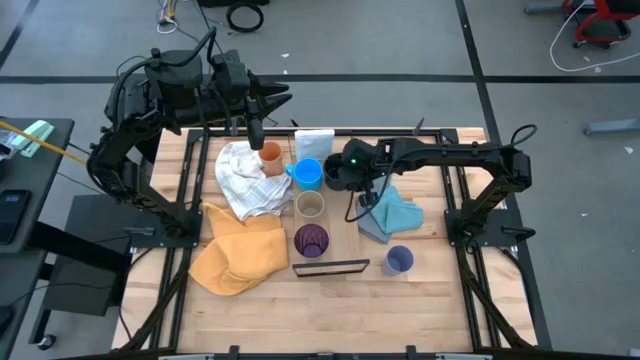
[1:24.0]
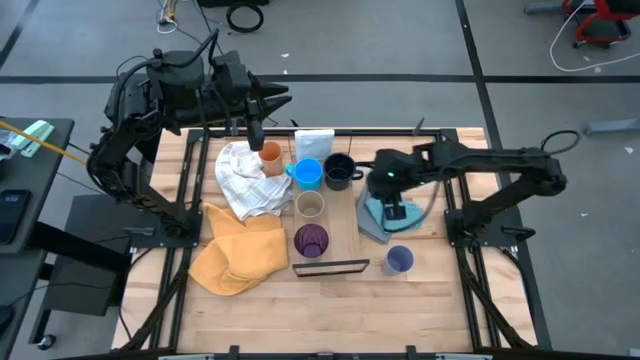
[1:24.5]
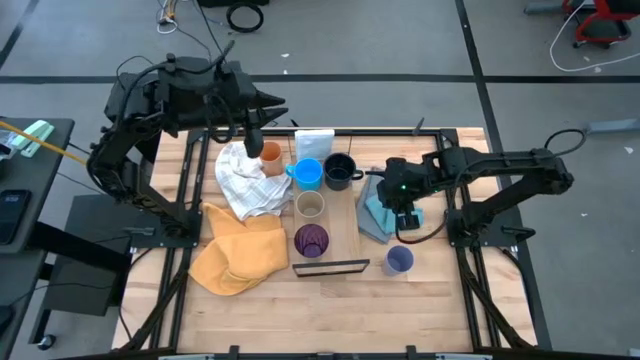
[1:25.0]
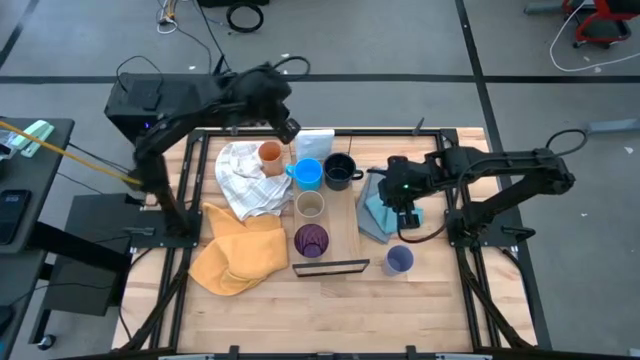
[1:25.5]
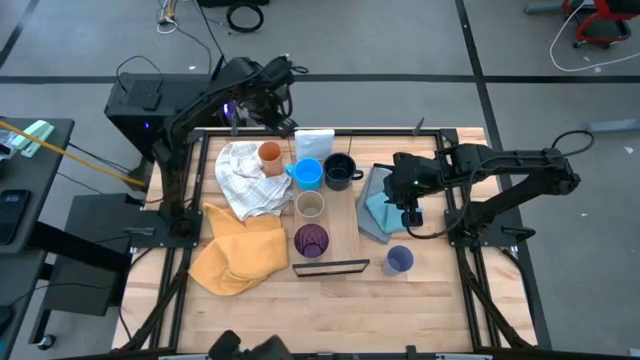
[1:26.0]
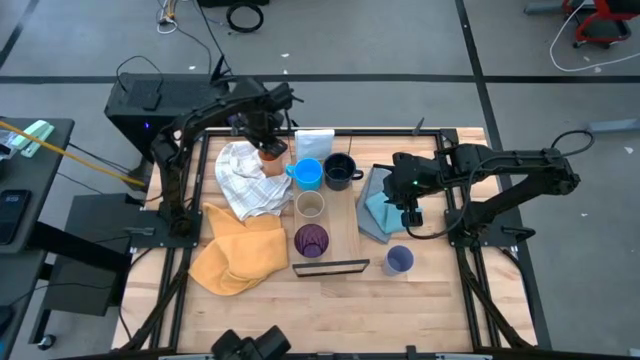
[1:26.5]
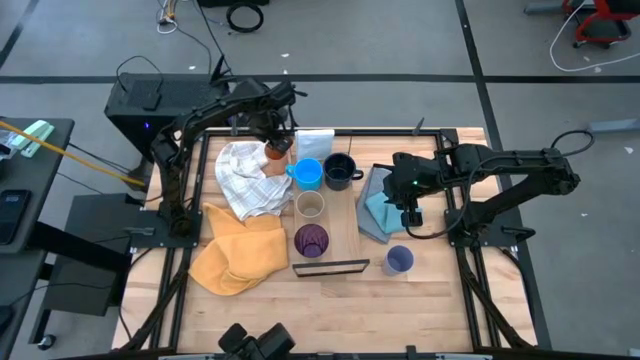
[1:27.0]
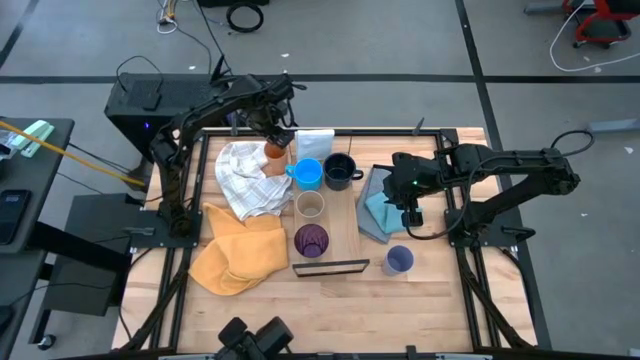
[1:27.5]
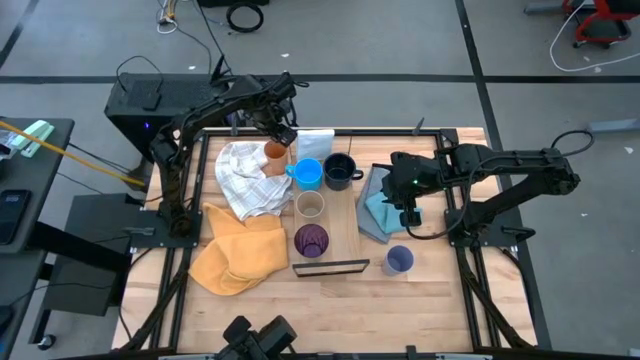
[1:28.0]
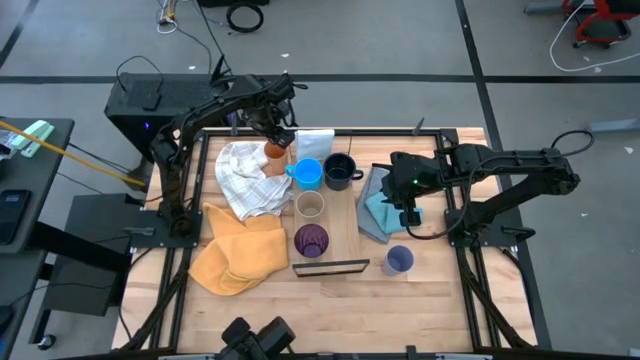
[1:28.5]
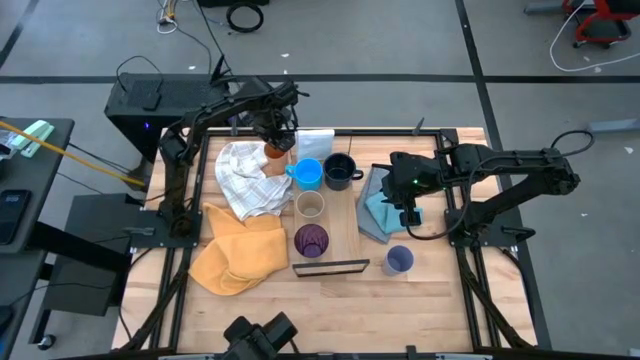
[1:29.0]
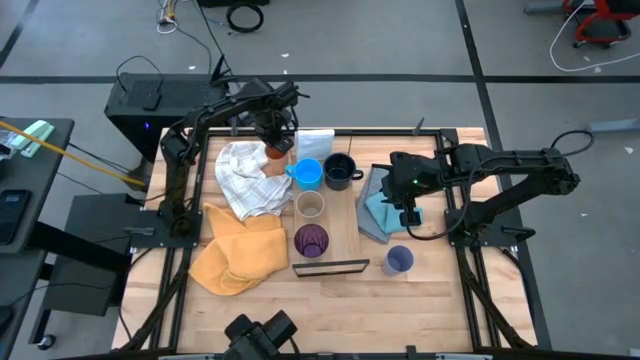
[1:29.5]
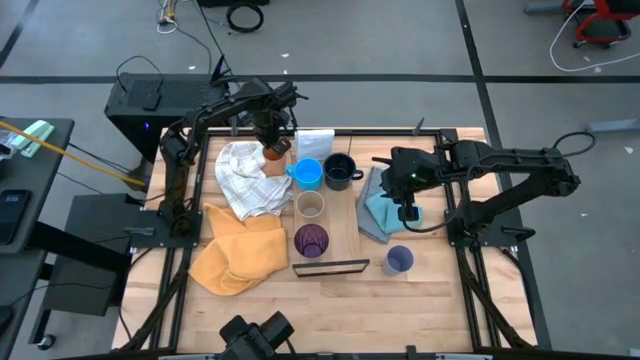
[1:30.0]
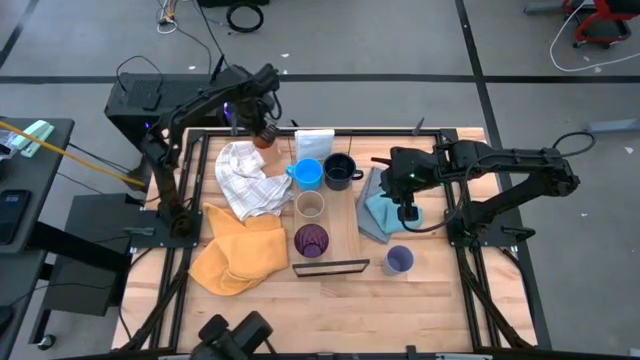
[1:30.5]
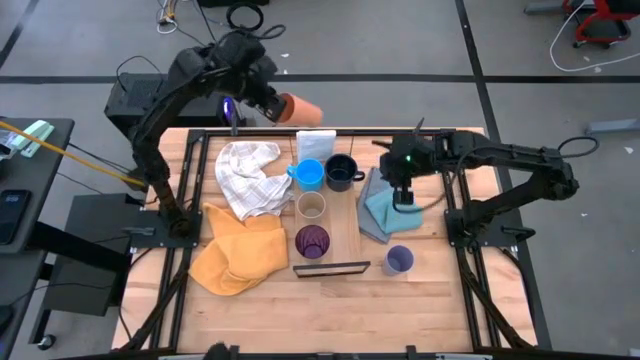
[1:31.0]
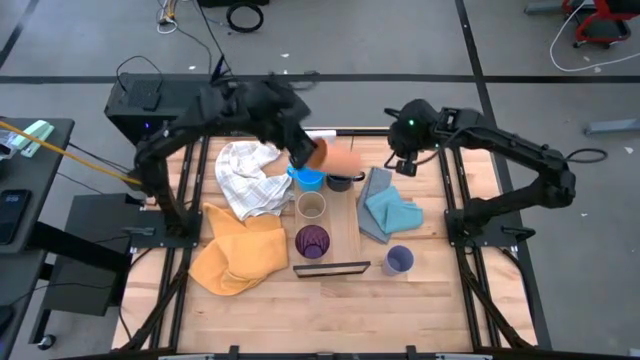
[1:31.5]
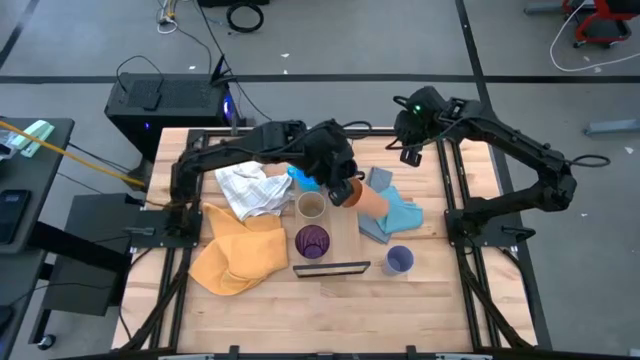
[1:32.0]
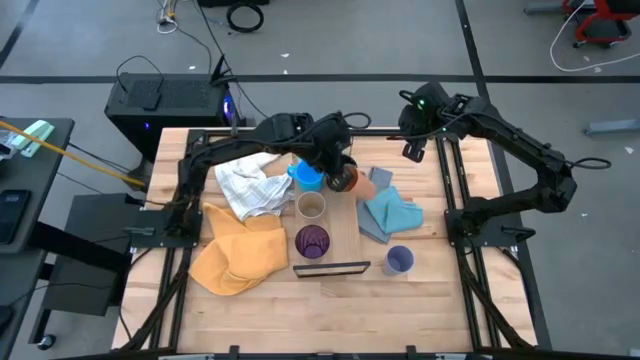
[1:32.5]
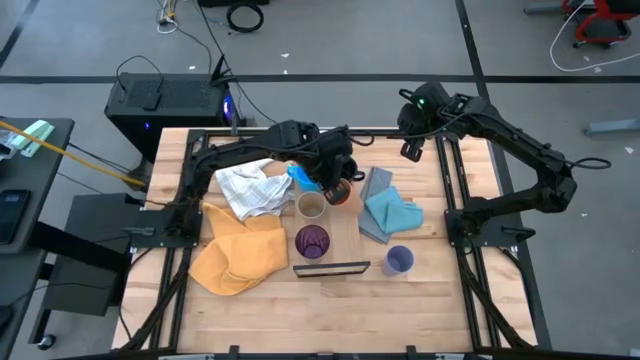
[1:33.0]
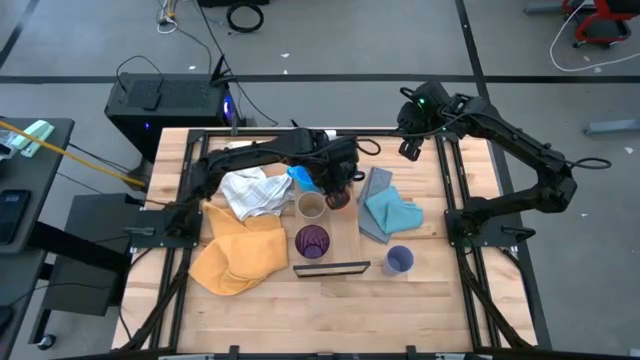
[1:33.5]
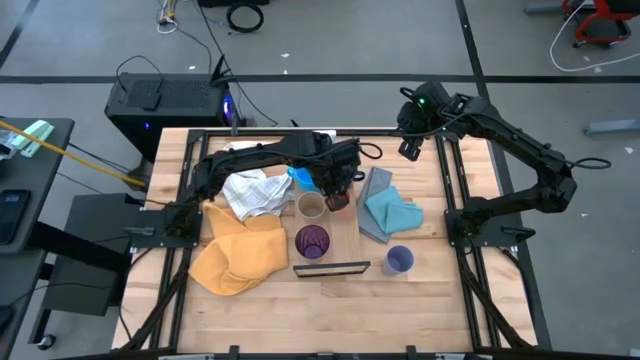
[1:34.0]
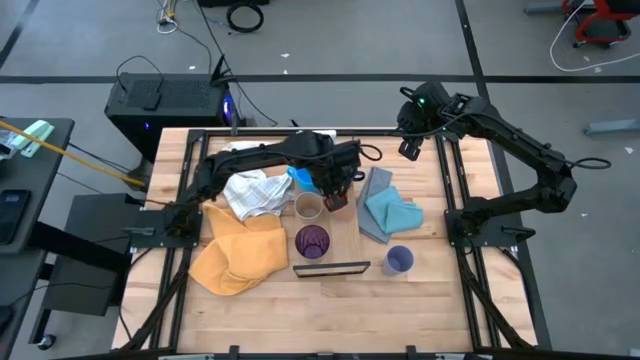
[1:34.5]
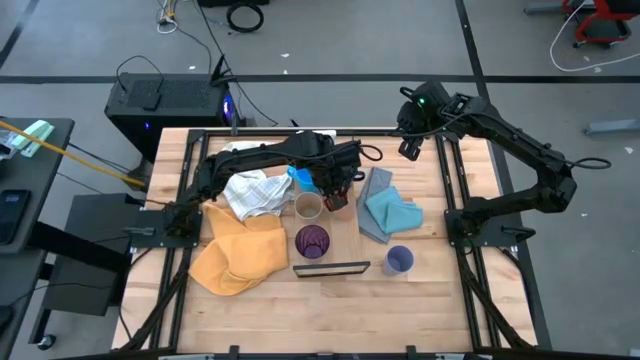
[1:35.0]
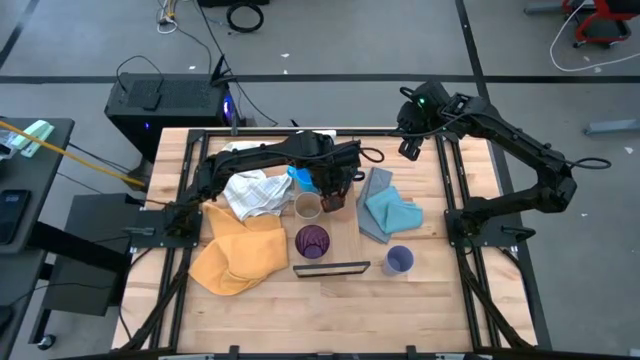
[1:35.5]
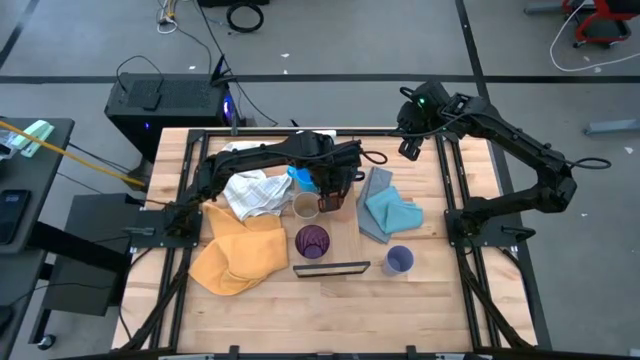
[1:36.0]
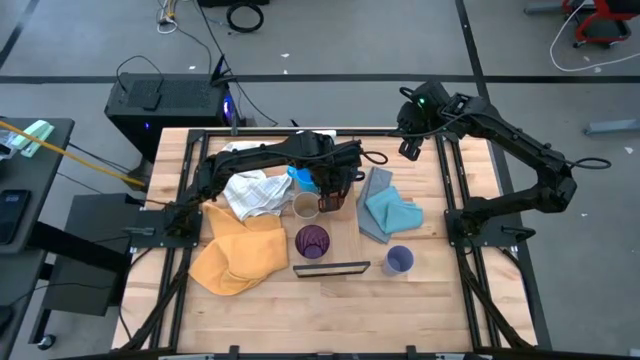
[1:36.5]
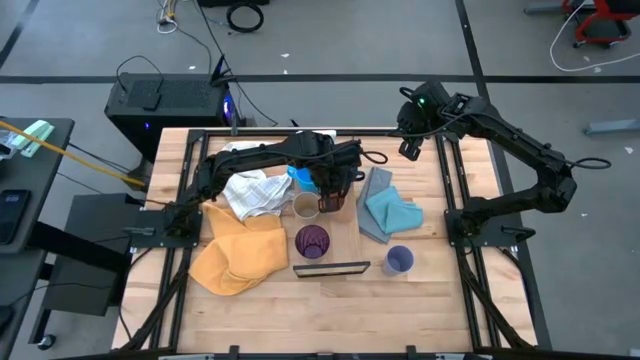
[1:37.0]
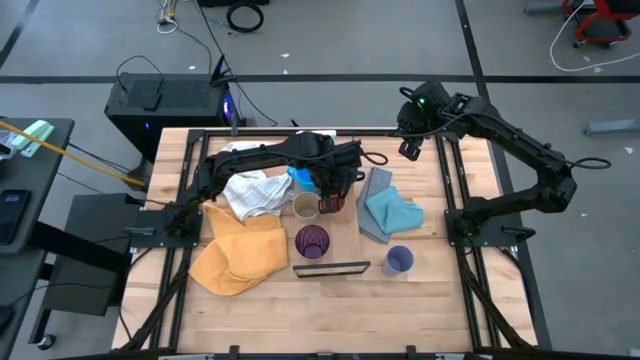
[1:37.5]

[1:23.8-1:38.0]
Task: Stack small to large cups/mugs on shelf
Put the orange cup on the shelf
